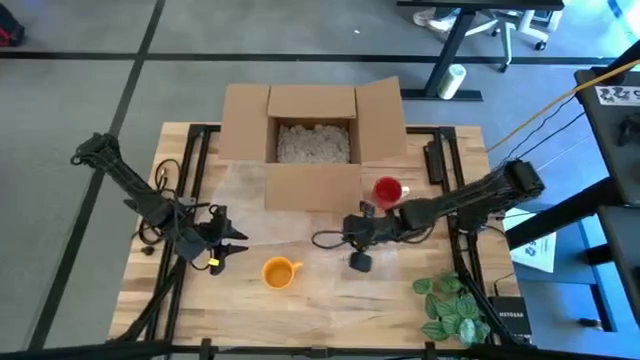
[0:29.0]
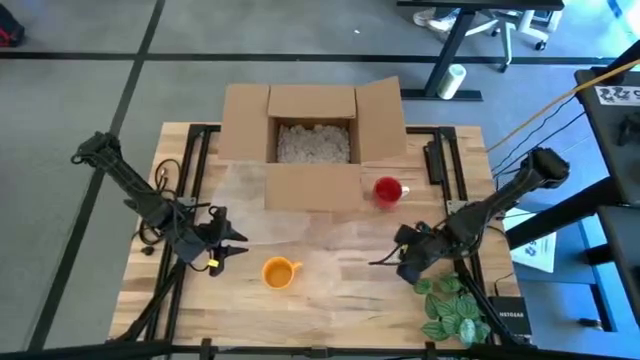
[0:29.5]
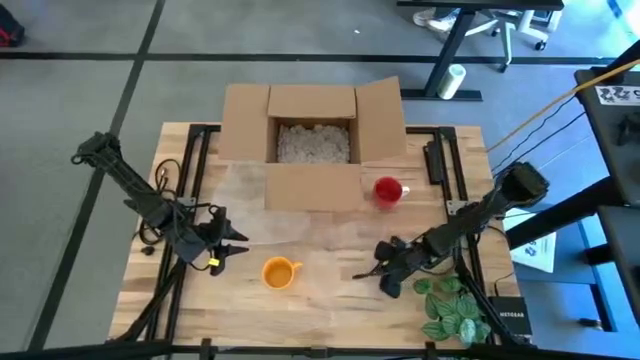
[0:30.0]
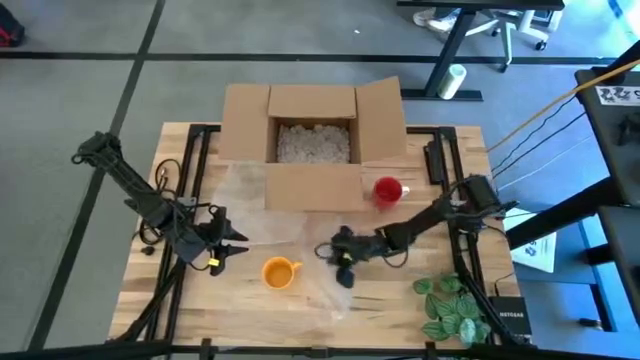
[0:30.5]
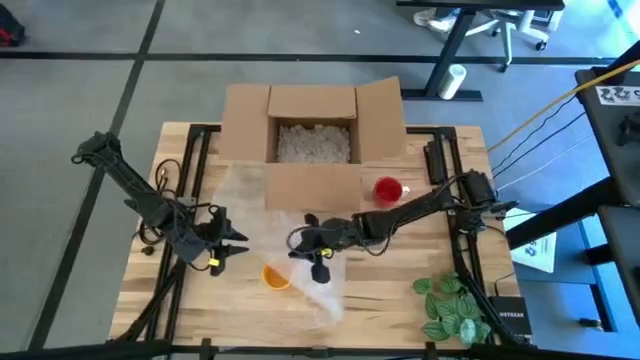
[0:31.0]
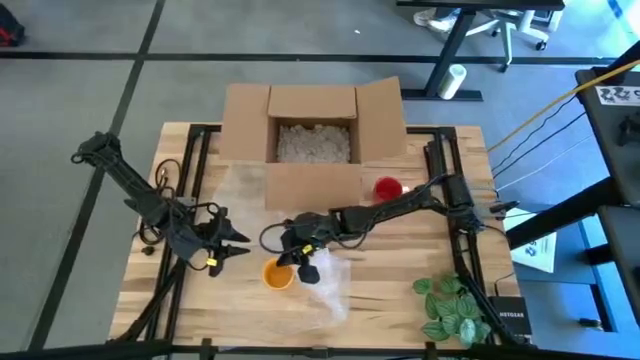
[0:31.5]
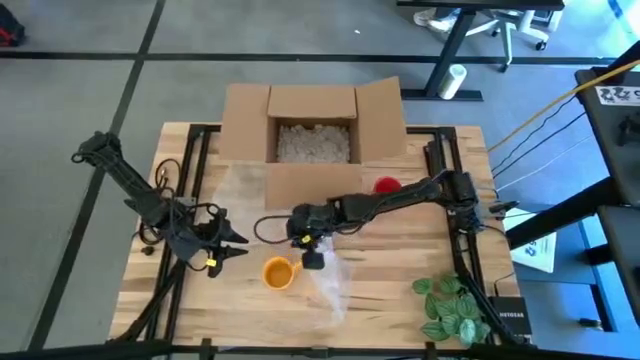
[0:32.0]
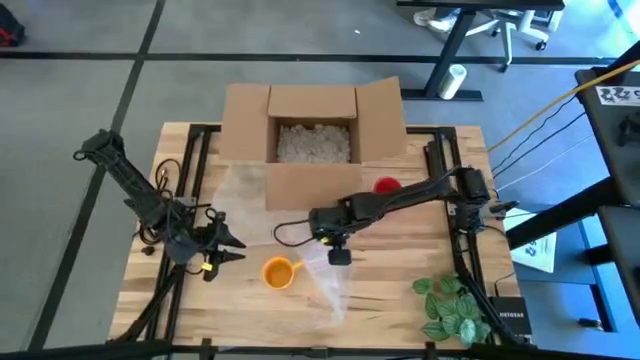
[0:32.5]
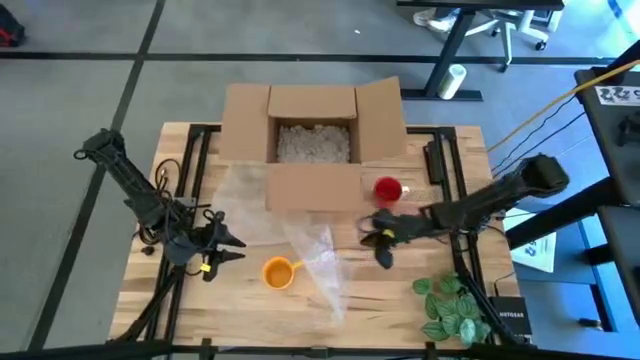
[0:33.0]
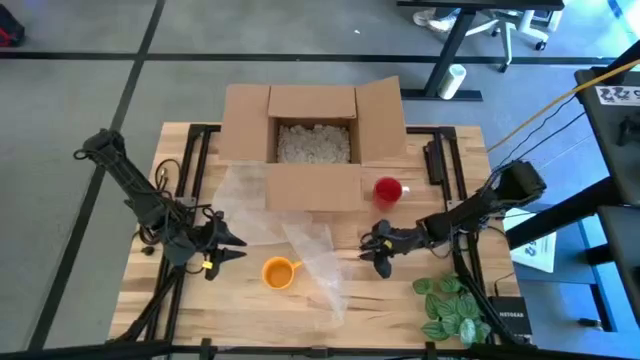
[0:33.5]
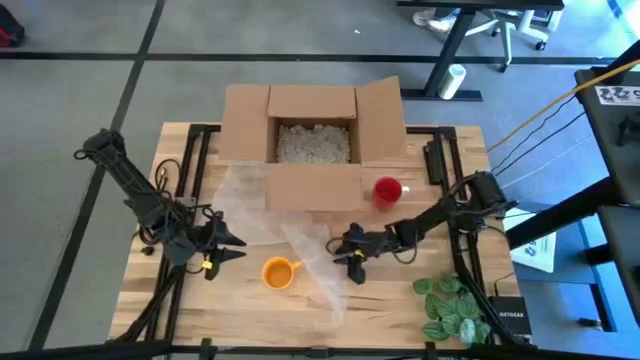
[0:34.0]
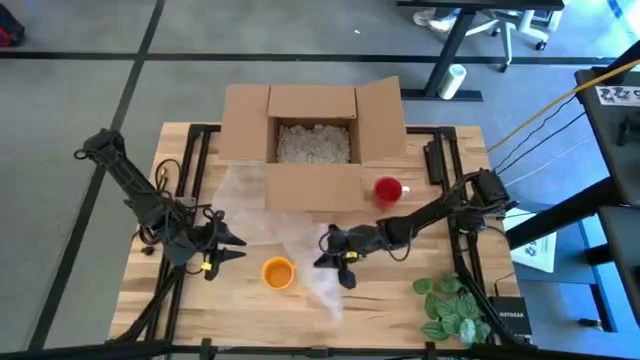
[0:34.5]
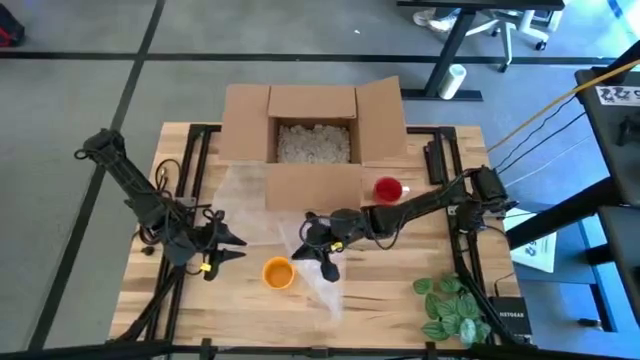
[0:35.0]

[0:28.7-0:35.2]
Task: wrap mug
Wrap the yellow mug using the bubble wrap

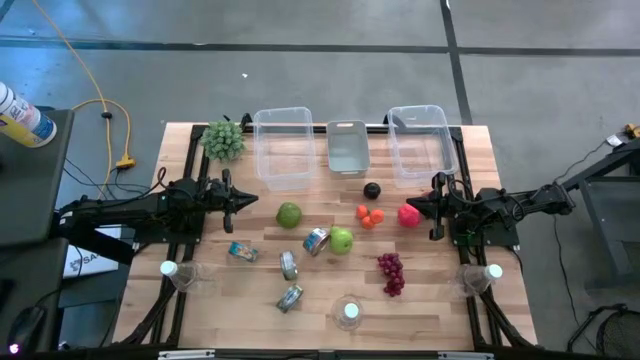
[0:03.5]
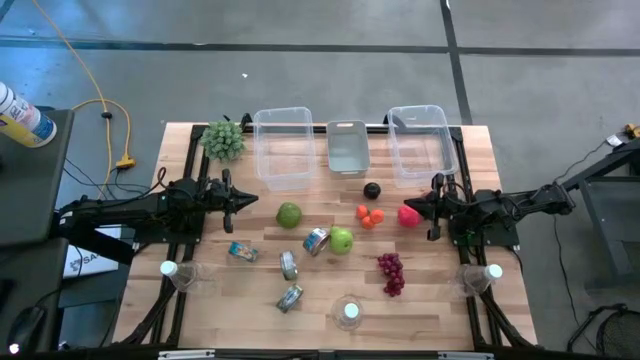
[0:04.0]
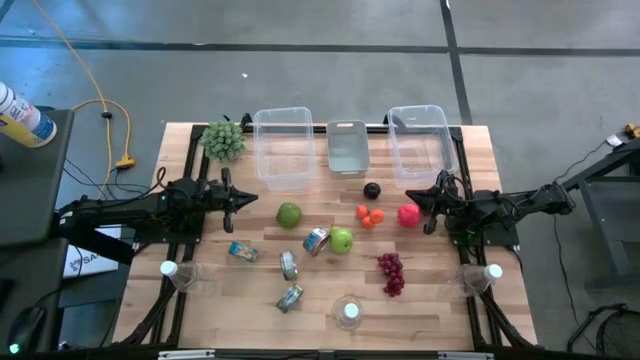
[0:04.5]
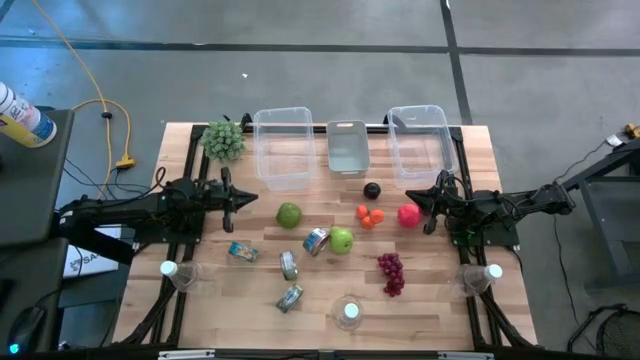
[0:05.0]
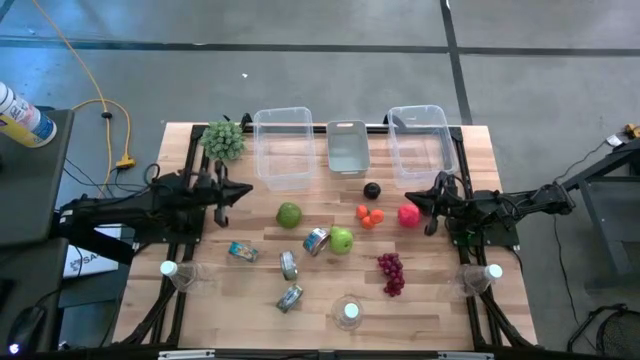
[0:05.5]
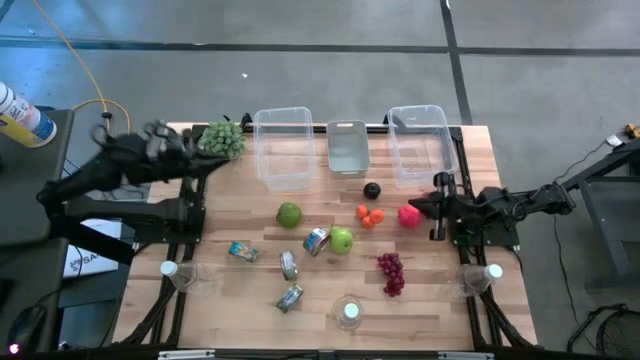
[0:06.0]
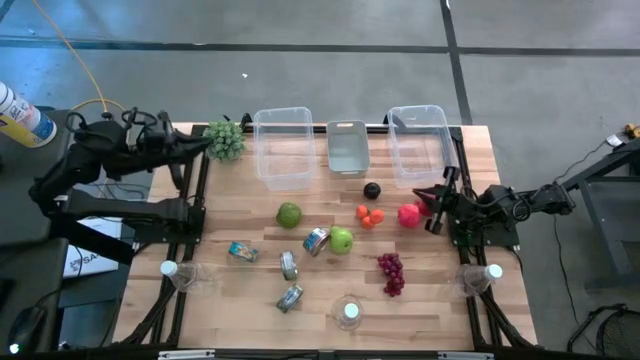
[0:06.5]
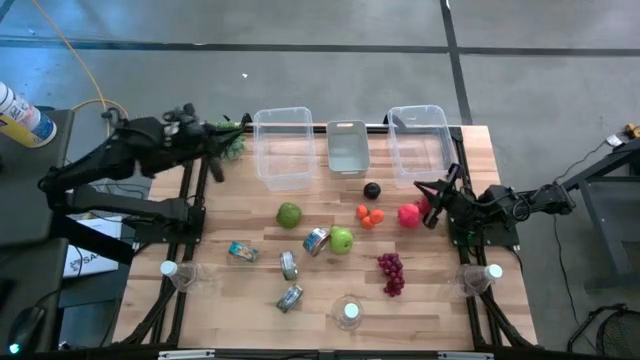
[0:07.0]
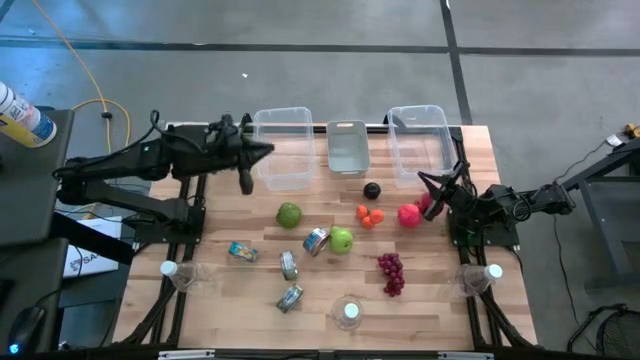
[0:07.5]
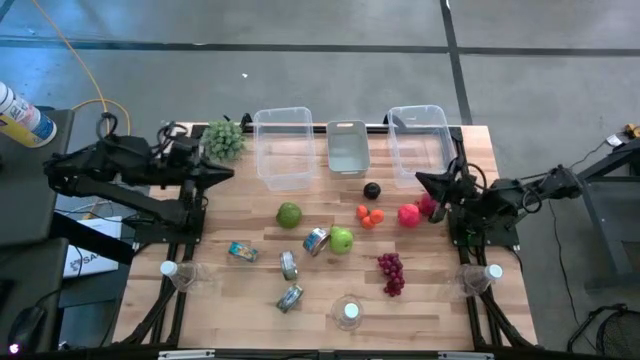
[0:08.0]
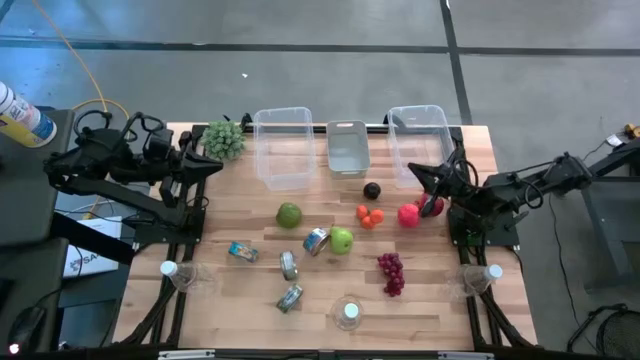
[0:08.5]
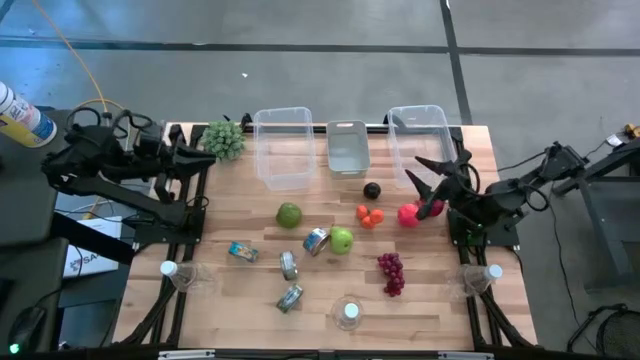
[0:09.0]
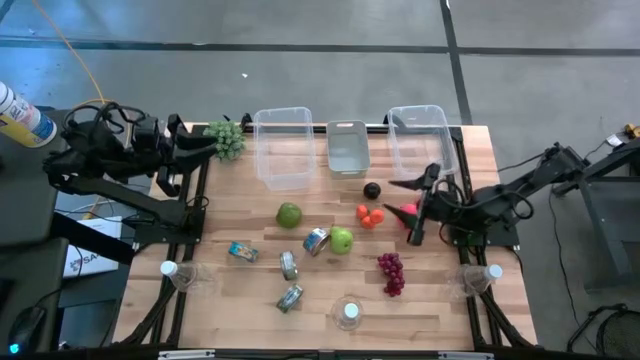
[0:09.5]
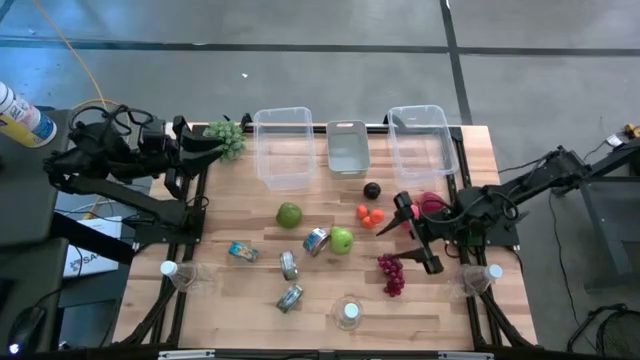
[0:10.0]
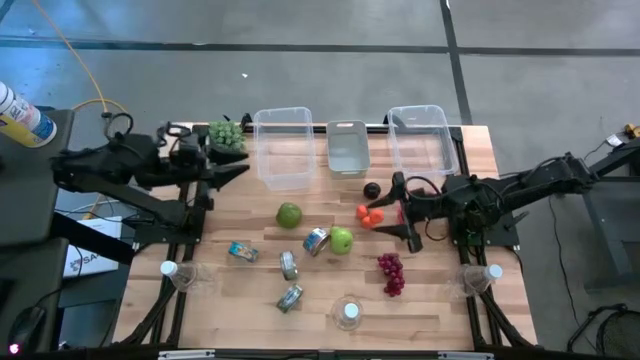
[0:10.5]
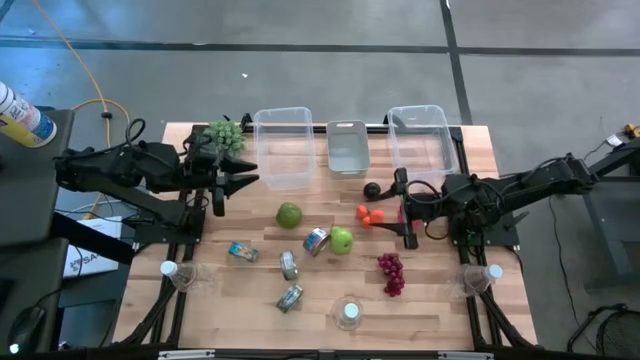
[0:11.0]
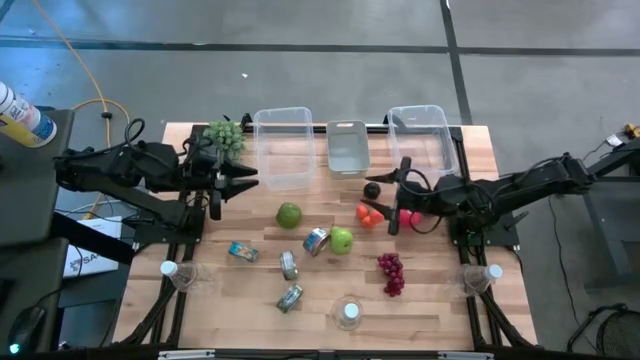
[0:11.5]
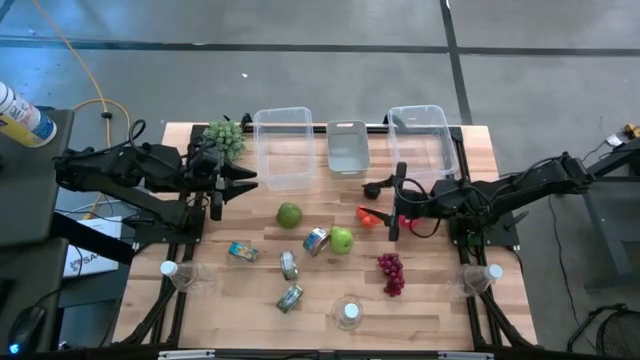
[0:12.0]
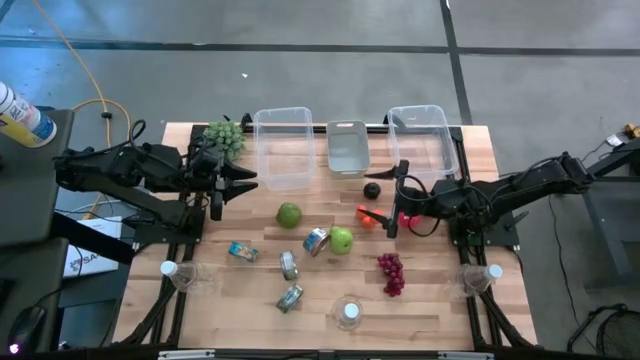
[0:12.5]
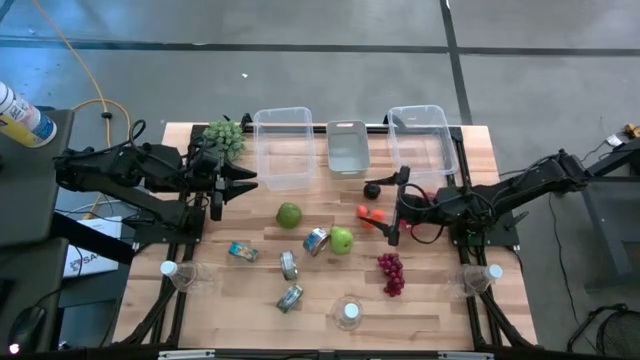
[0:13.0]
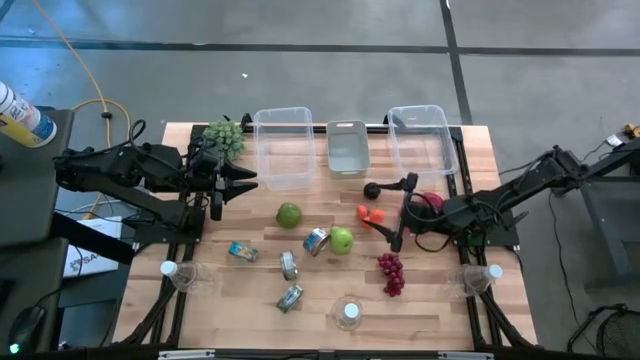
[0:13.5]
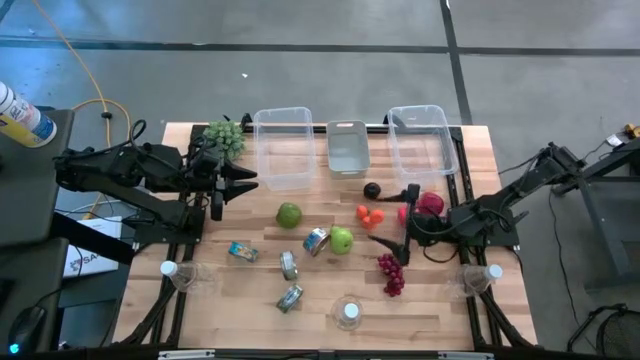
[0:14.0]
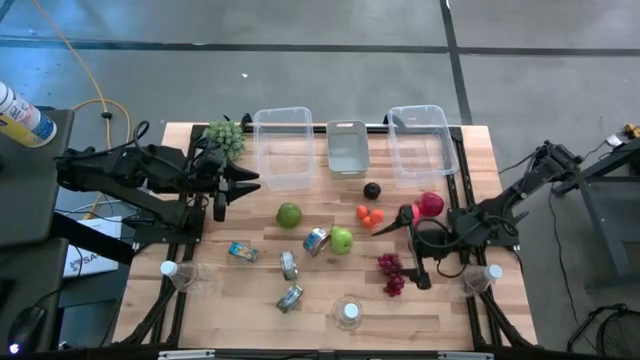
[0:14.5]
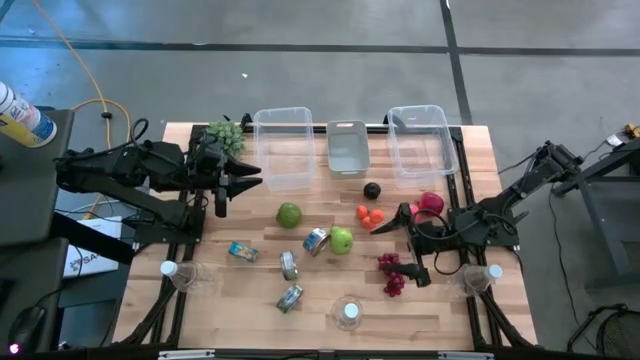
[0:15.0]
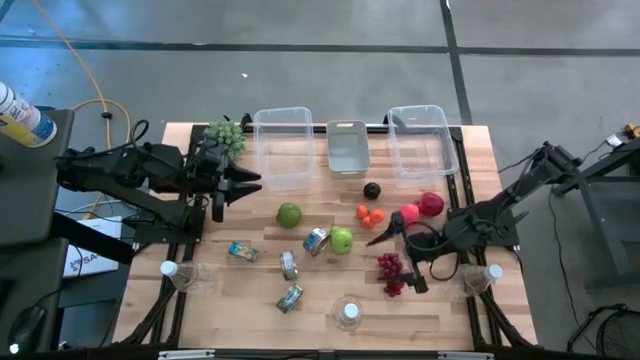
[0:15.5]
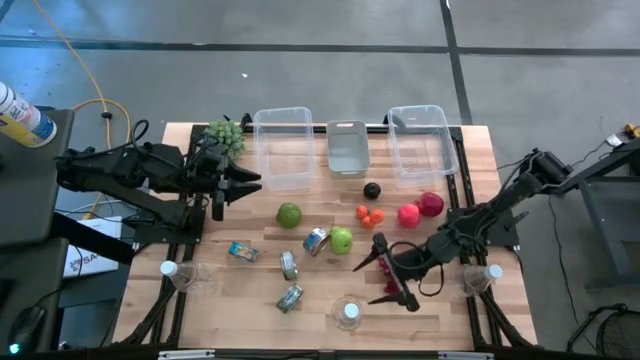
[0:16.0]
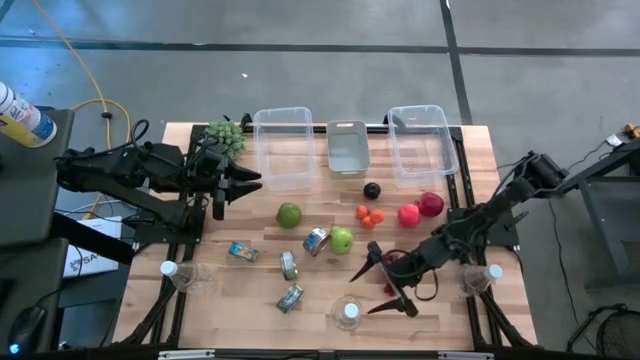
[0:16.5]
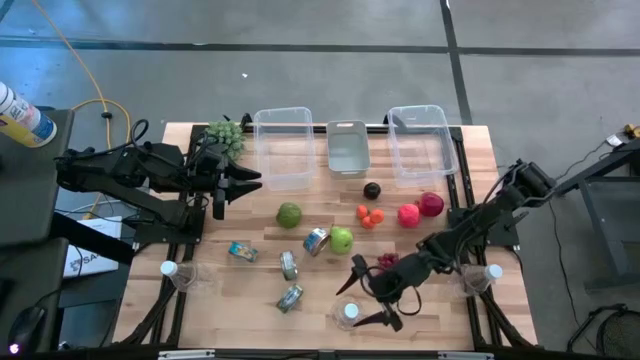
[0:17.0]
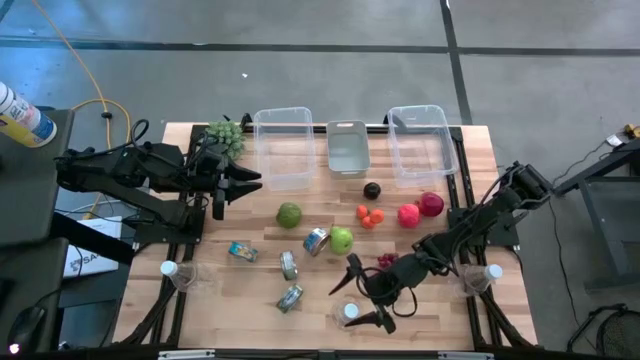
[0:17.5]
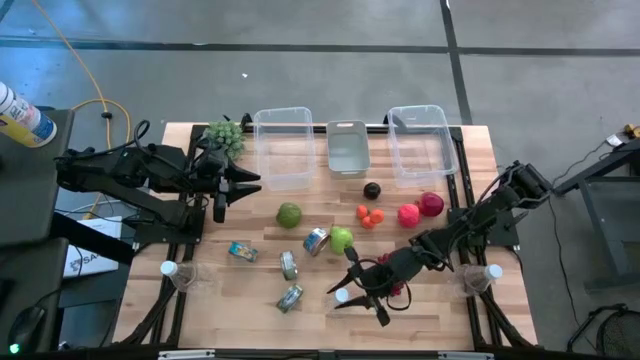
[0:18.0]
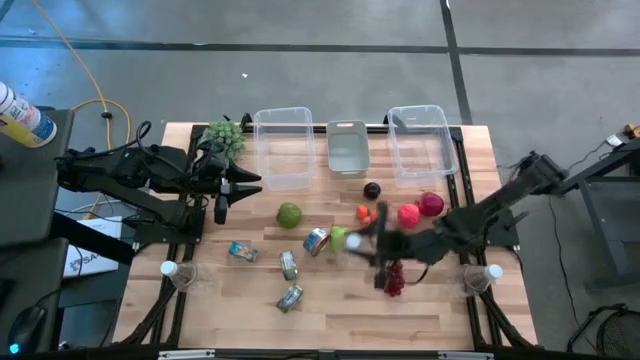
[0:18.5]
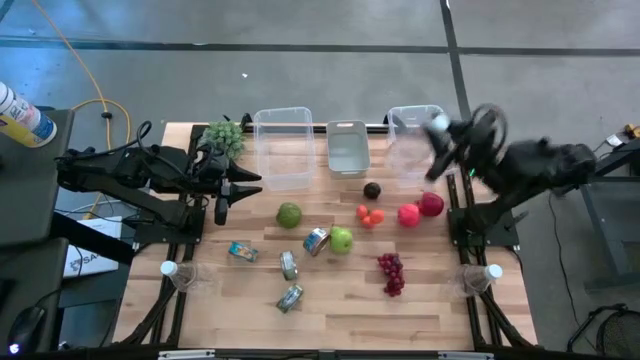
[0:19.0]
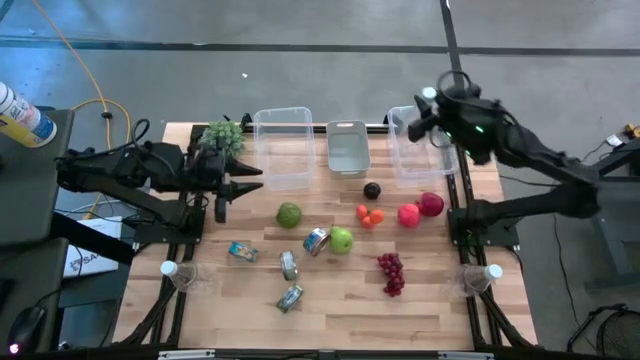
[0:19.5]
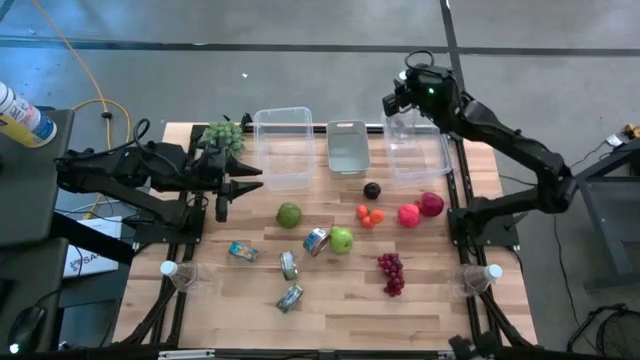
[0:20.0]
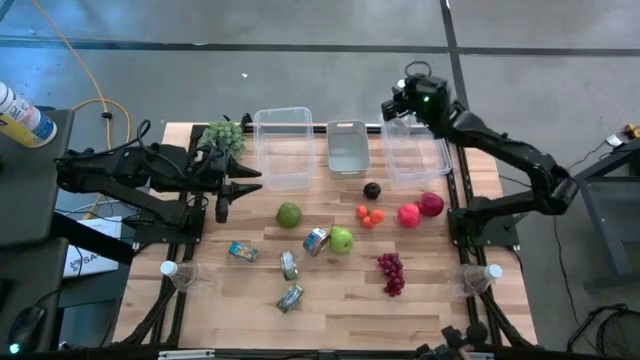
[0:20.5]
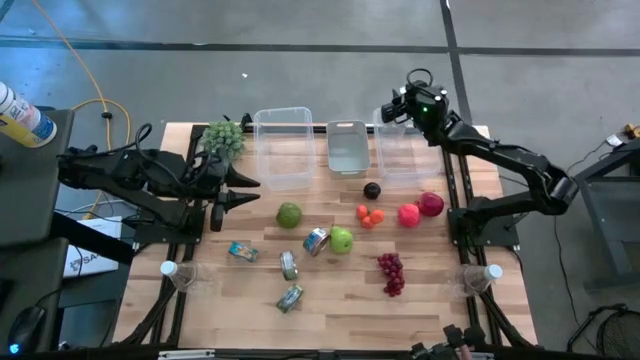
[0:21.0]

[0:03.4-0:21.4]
Task: Pick & Place Food Item
Put the empty water bottle into the right transparent bin
